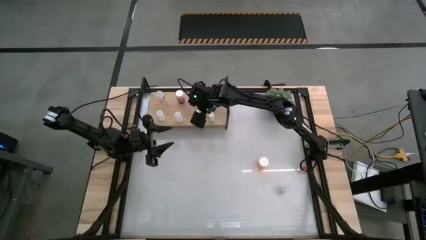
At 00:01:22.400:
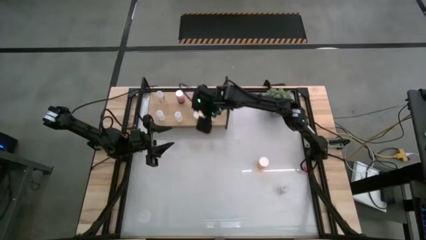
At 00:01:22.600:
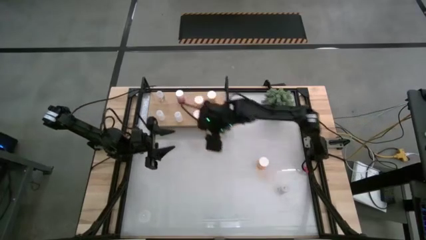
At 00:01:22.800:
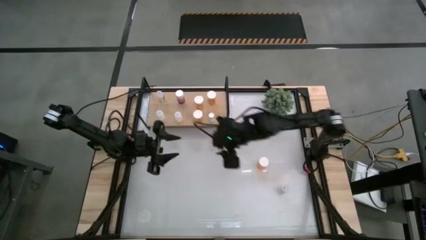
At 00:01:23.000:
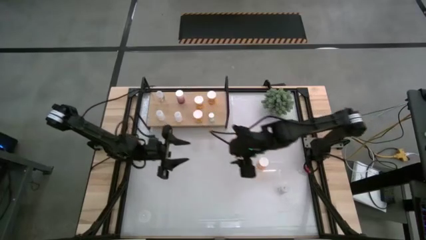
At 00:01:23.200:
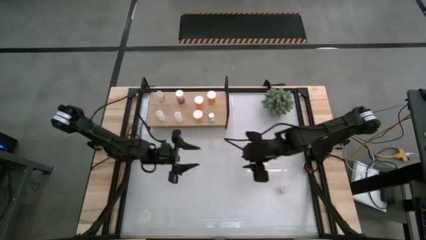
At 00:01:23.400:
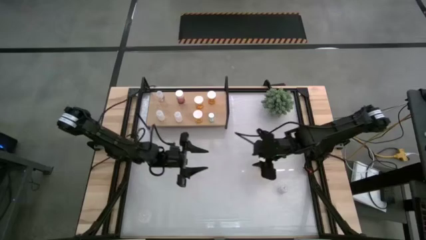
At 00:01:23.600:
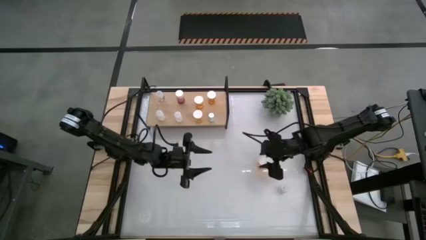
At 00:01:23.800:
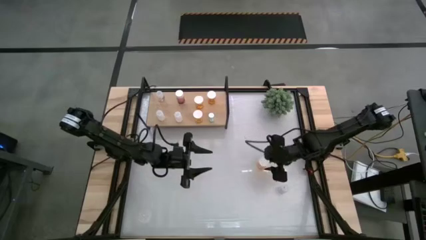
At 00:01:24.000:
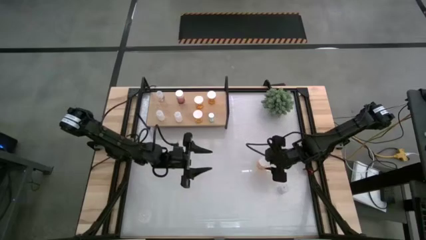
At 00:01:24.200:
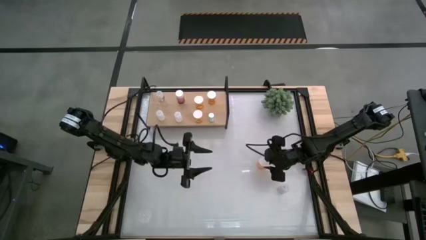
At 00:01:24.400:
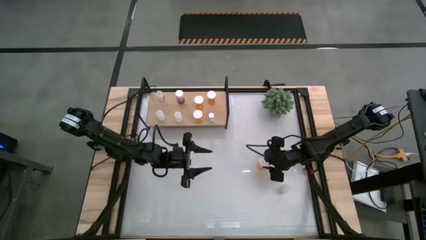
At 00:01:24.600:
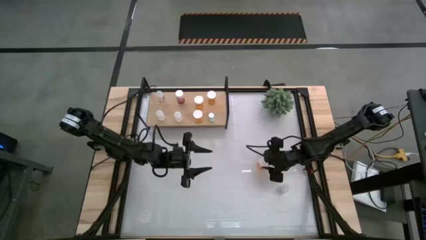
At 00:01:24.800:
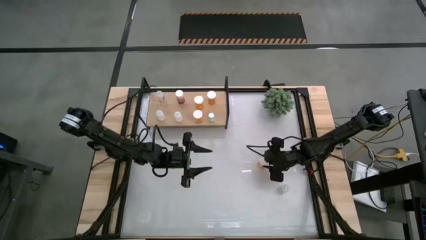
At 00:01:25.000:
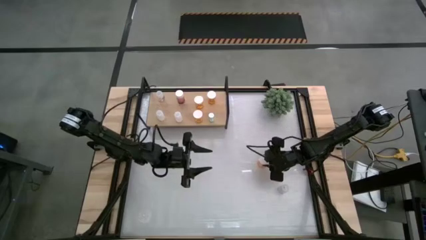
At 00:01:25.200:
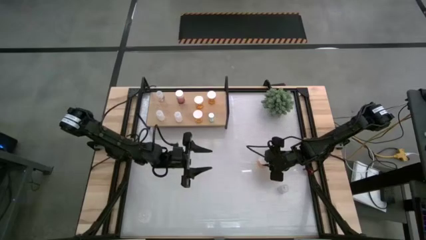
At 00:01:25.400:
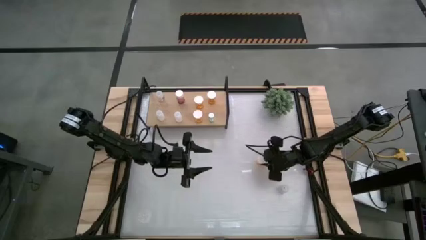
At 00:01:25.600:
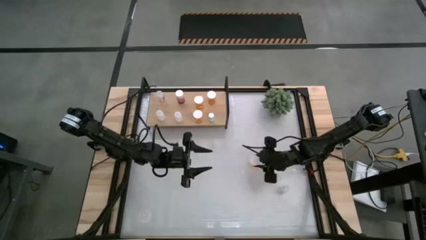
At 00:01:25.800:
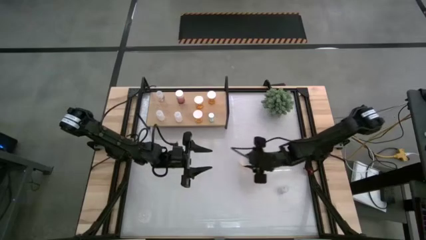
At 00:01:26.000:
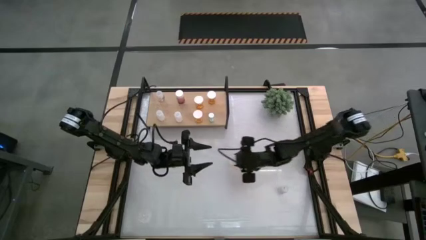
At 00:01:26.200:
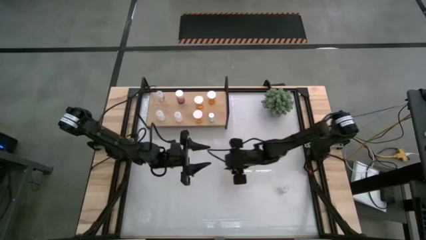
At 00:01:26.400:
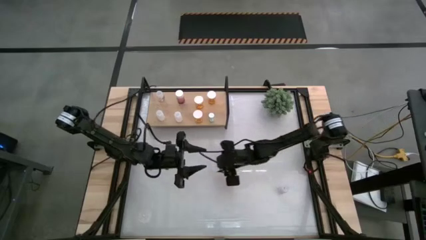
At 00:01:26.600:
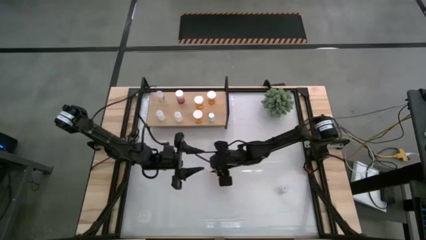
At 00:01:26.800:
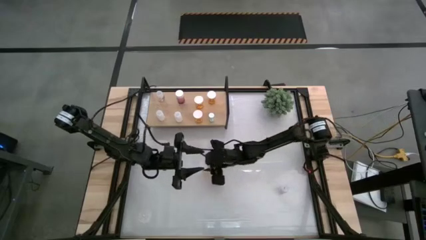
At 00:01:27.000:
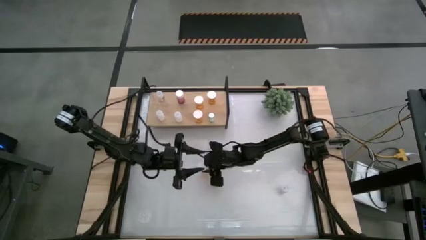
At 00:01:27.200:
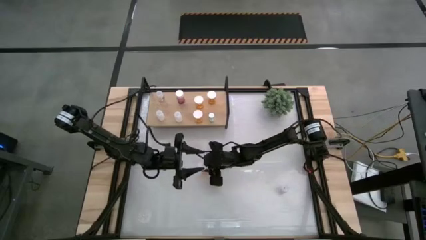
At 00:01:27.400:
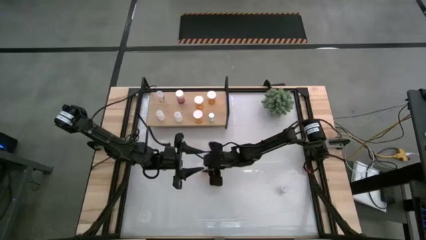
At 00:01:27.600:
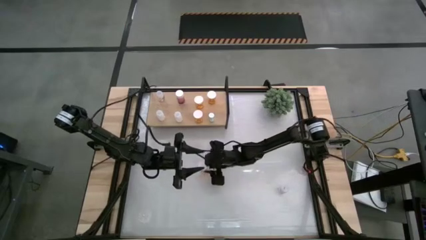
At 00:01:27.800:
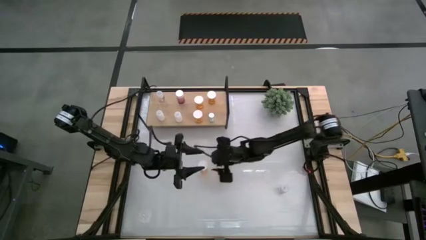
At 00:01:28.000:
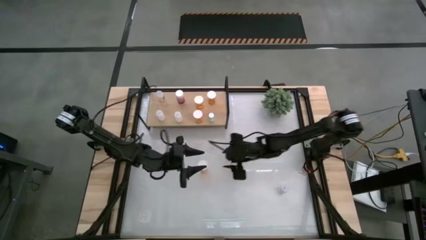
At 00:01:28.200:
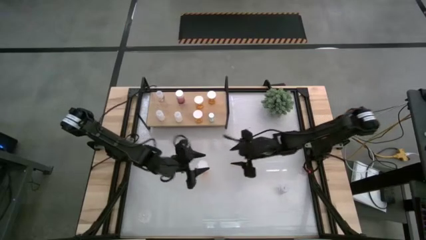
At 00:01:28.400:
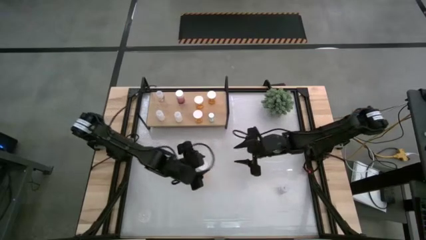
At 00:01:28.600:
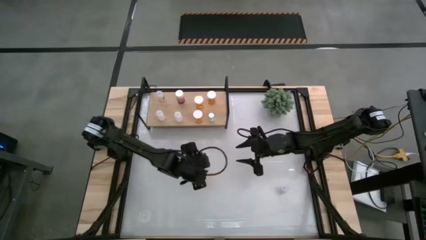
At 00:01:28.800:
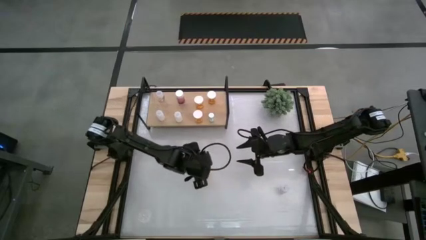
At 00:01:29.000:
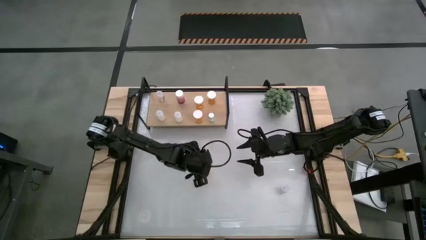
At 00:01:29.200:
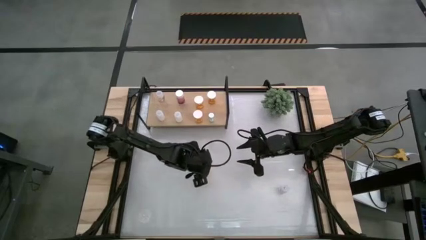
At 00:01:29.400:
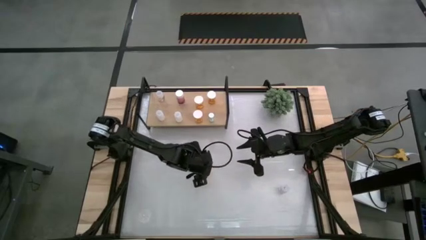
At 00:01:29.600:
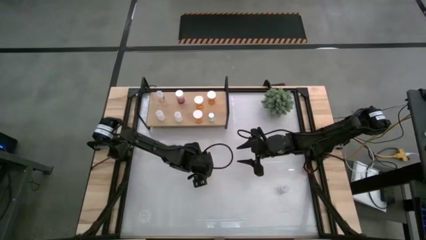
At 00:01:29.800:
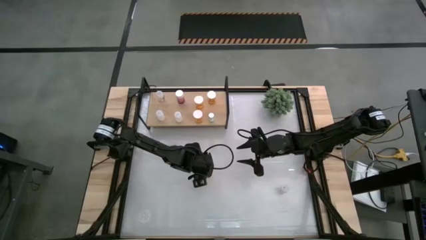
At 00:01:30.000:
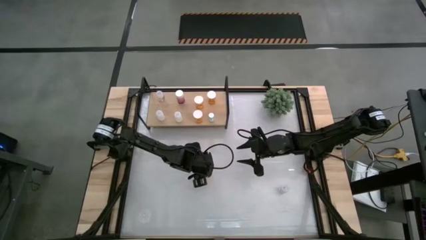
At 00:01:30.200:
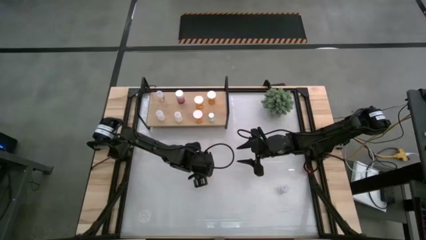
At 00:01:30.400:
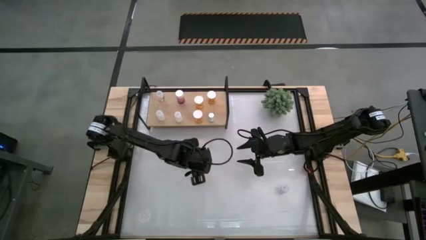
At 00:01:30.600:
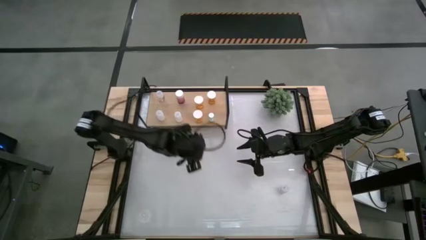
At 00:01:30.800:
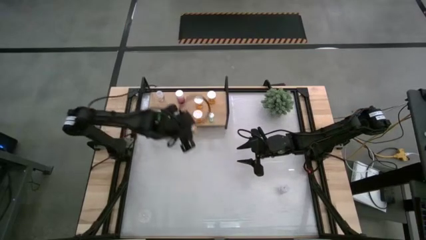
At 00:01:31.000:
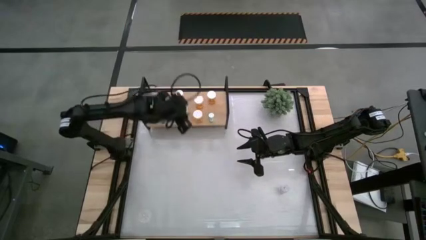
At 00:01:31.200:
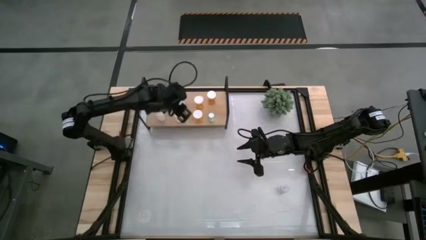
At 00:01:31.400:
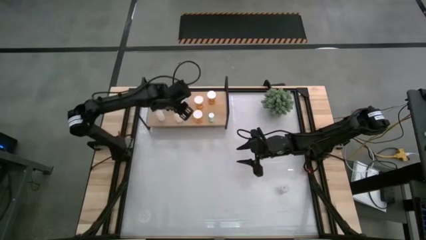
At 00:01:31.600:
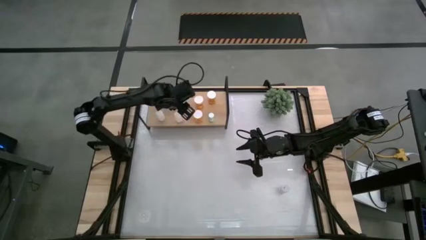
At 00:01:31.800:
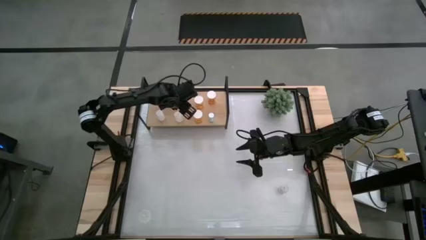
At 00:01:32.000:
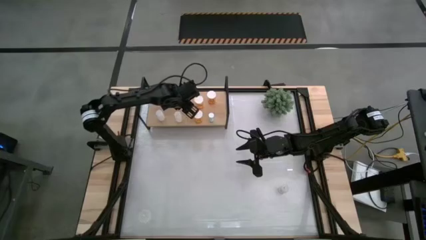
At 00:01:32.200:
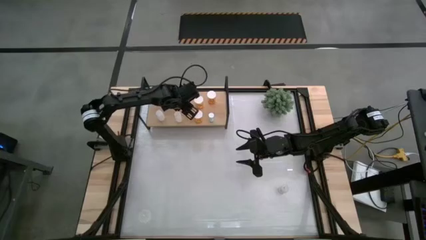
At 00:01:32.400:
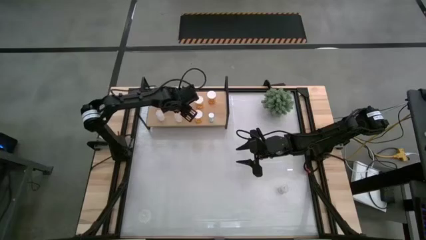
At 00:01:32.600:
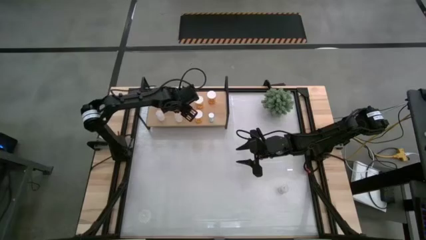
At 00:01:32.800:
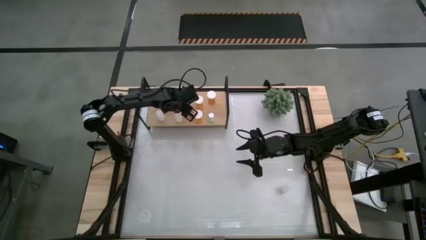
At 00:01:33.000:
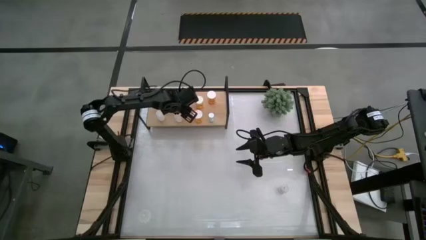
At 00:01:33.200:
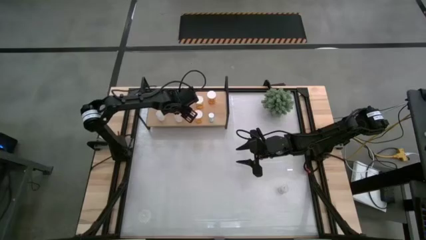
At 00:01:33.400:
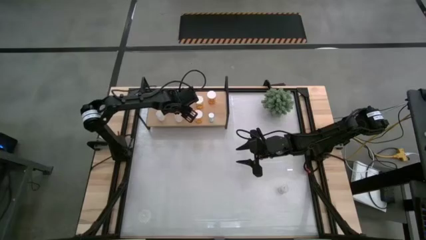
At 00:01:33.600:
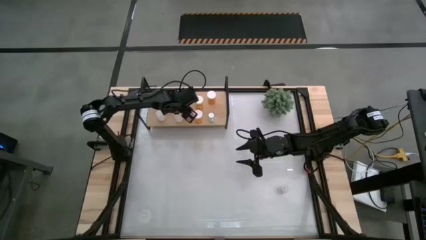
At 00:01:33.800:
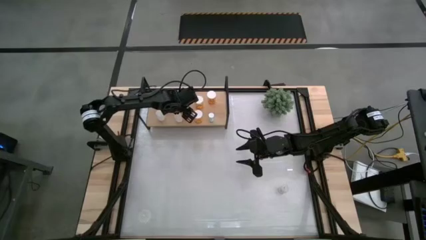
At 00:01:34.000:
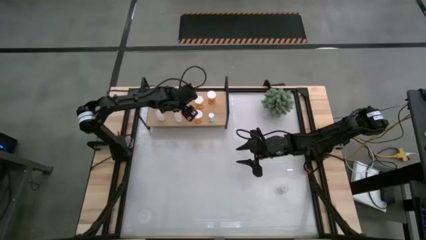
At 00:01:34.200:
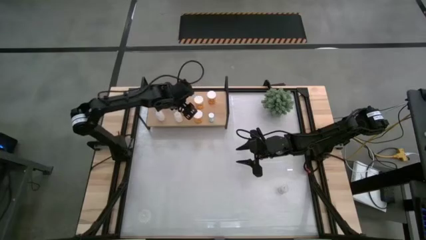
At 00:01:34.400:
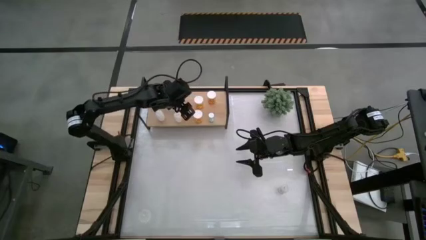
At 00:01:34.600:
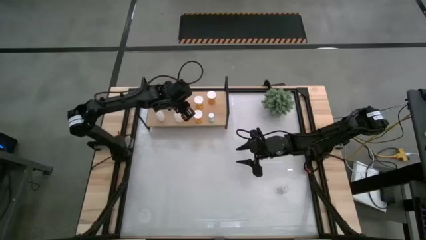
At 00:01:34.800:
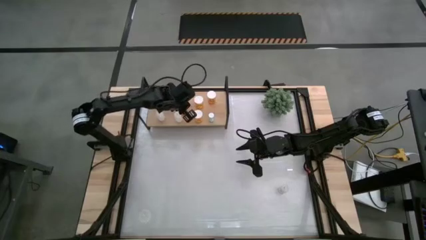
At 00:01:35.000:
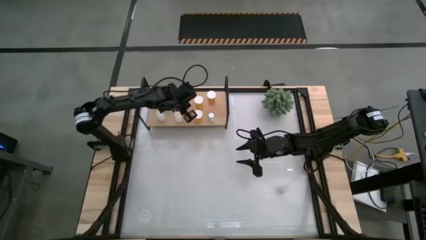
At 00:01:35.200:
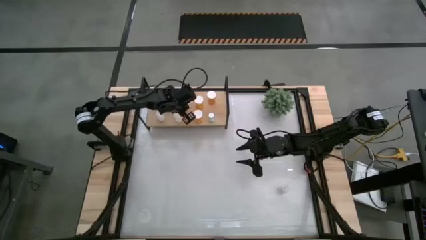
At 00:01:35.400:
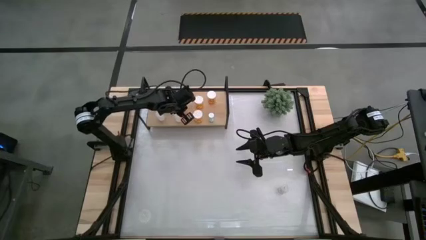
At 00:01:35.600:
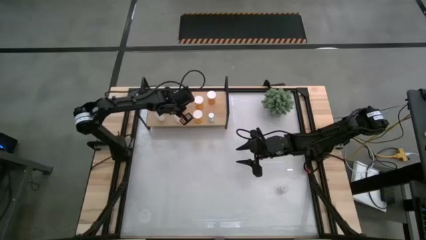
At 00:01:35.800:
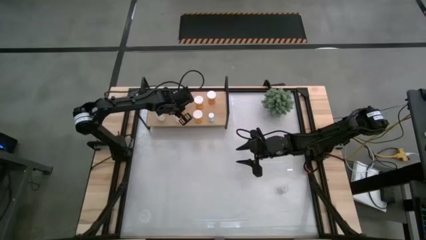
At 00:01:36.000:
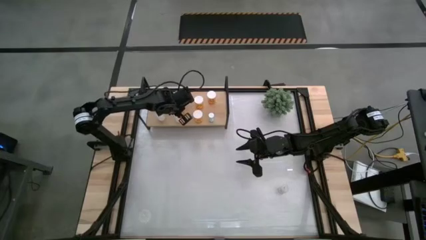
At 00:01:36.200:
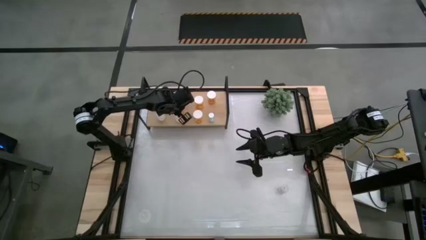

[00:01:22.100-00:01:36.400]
Task: Pick and place medicine bottles onto shelf by color
Put the orange pill bottle on the shelf

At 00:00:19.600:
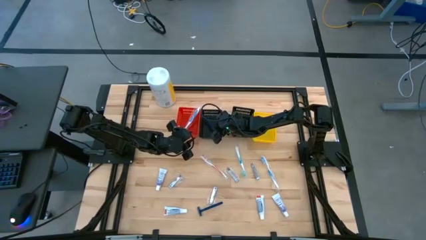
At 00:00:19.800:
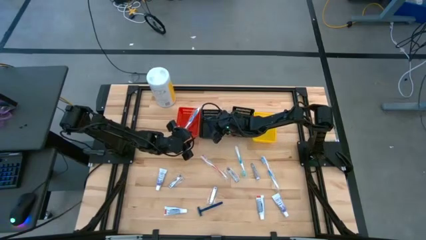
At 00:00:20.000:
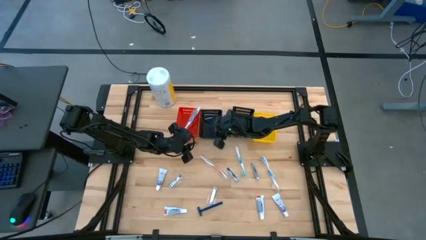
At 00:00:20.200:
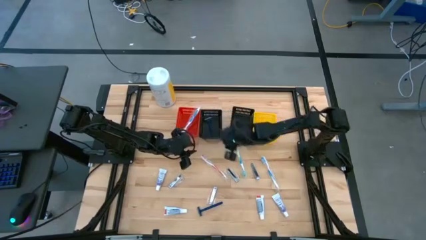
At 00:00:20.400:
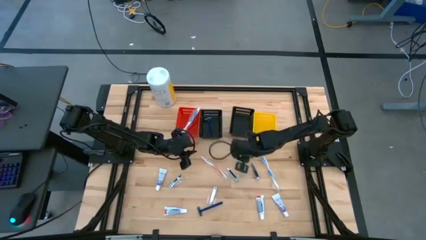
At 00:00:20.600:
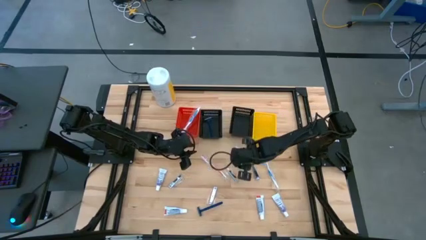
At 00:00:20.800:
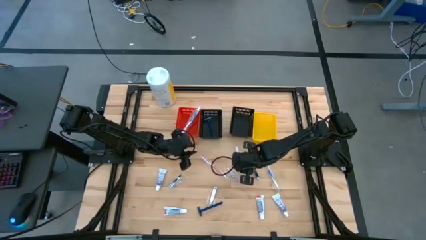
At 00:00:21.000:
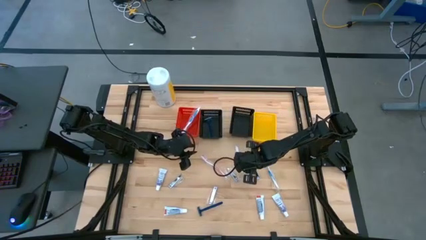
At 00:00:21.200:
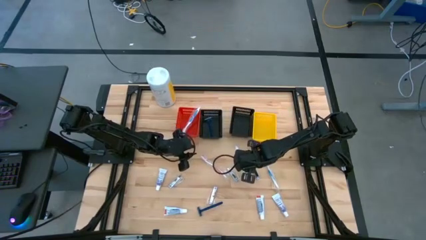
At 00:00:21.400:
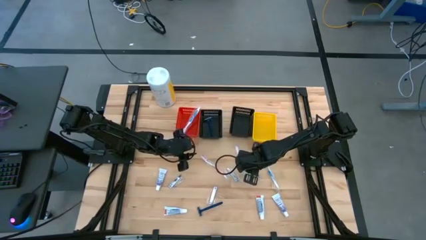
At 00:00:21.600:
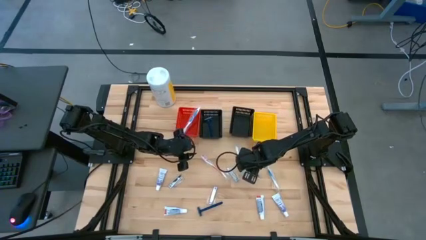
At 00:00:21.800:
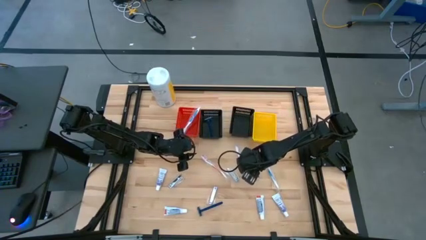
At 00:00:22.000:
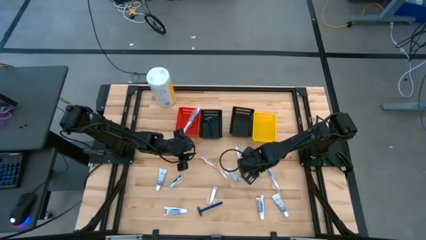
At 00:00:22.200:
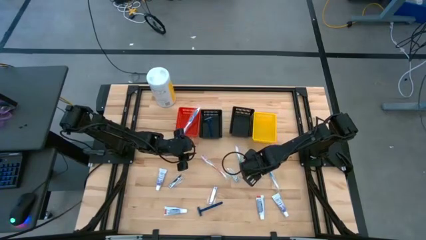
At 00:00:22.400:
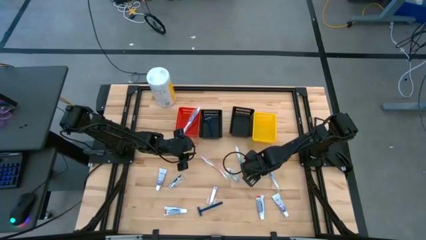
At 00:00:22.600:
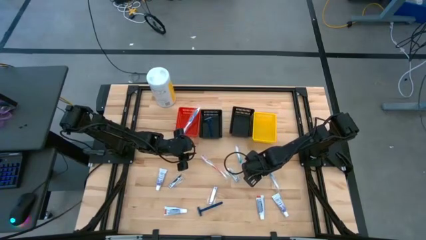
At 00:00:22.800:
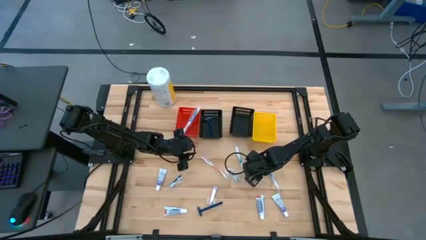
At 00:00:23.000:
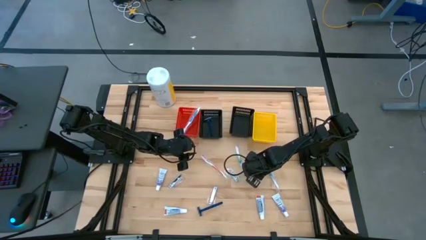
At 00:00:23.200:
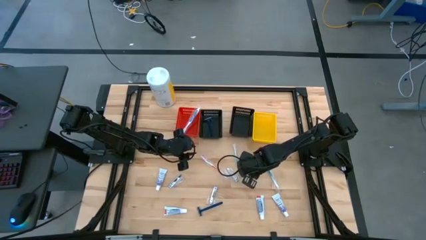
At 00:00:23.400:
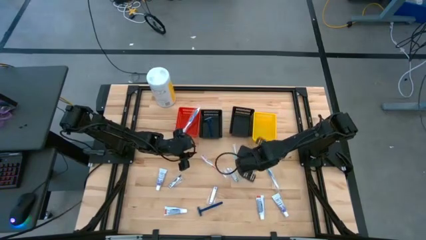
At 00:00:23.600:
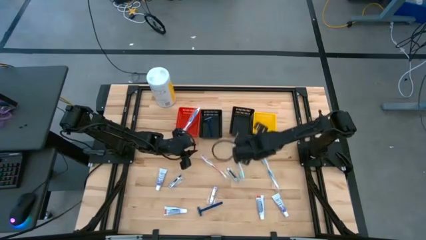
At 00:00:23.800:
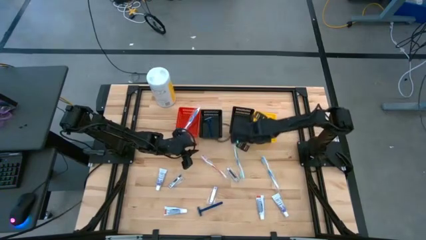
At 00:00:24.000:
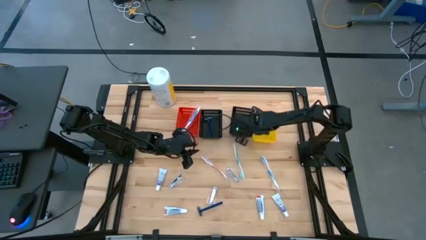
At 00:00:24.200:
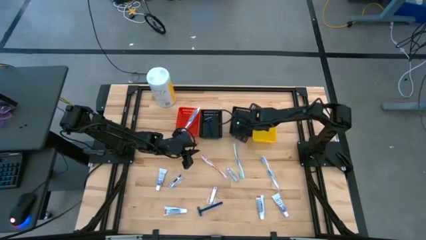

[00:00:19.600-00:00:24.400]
Task: Pick & Place Travel size toiletries
Put the silver nail cutter into the right black basket
